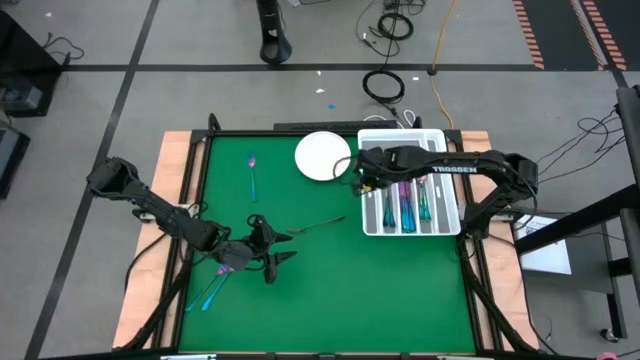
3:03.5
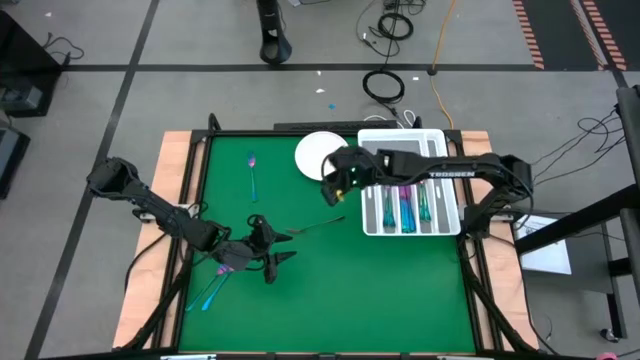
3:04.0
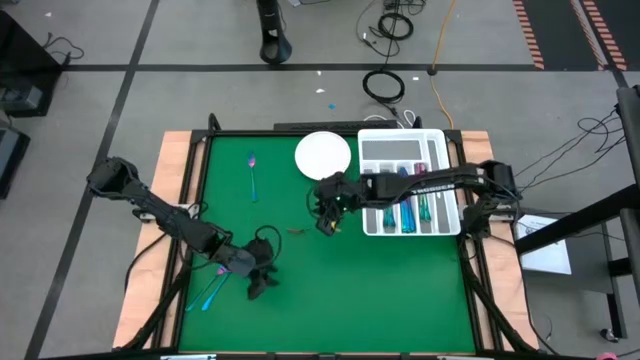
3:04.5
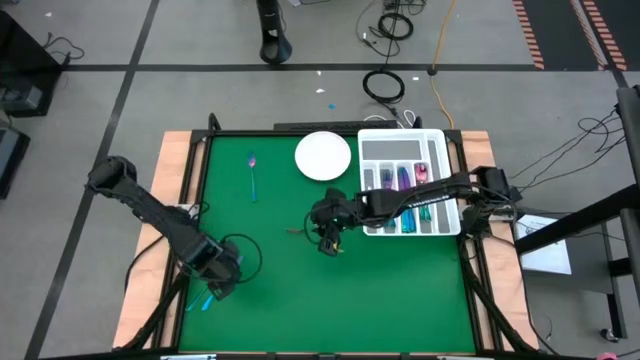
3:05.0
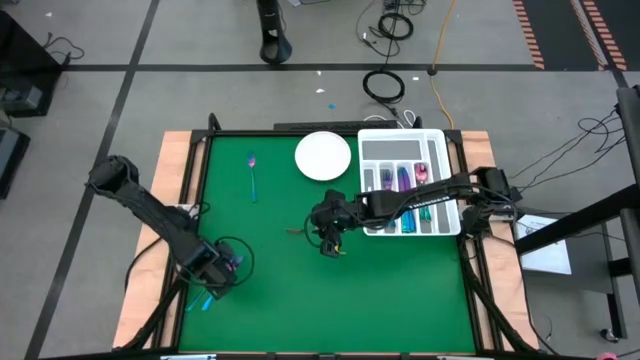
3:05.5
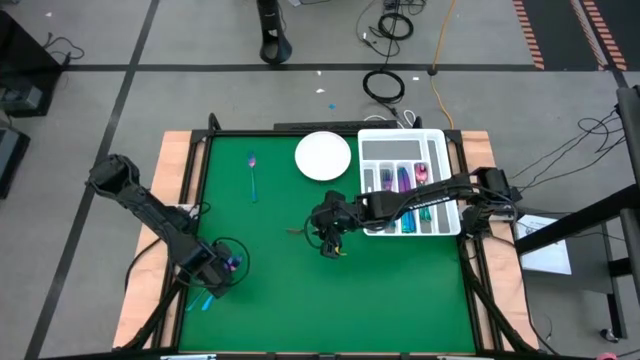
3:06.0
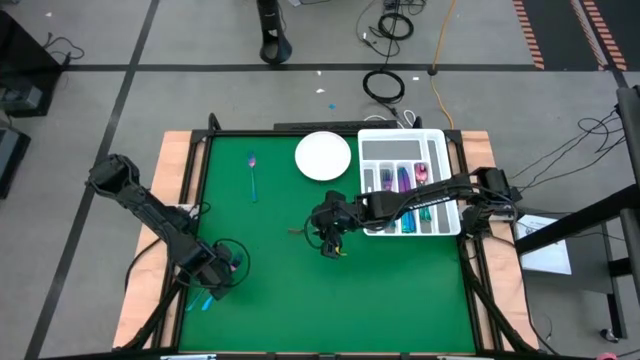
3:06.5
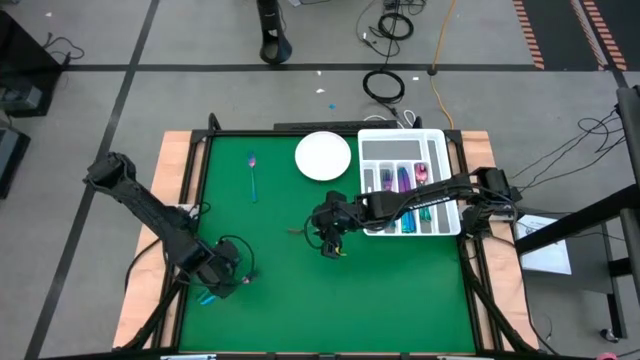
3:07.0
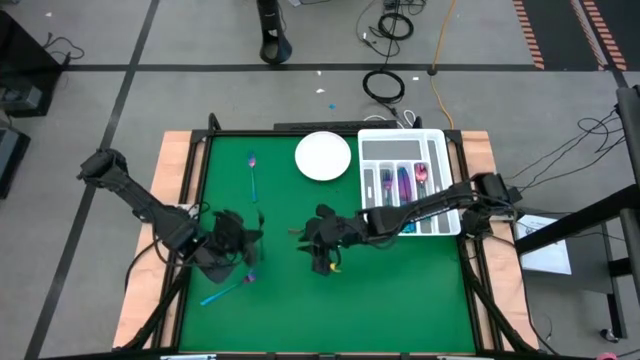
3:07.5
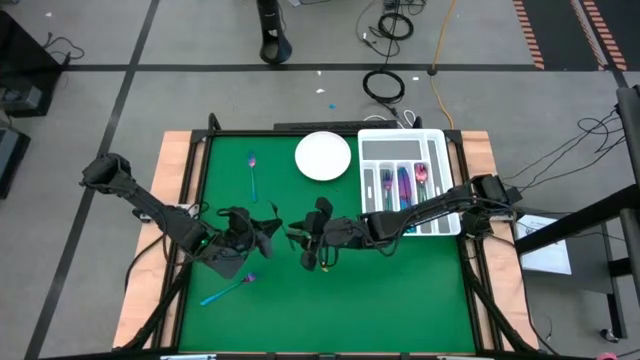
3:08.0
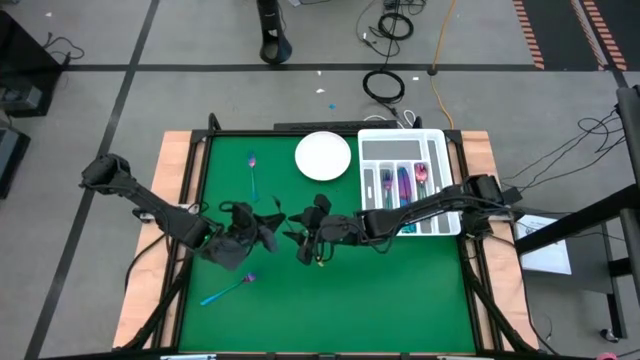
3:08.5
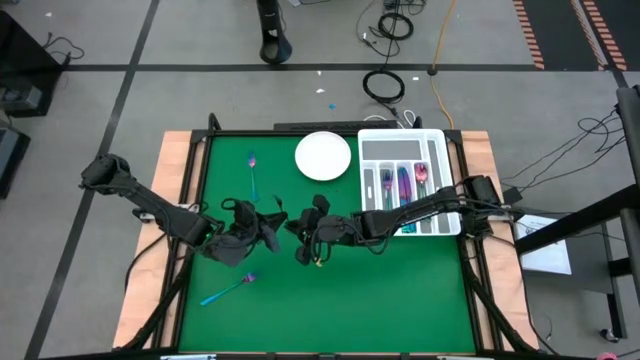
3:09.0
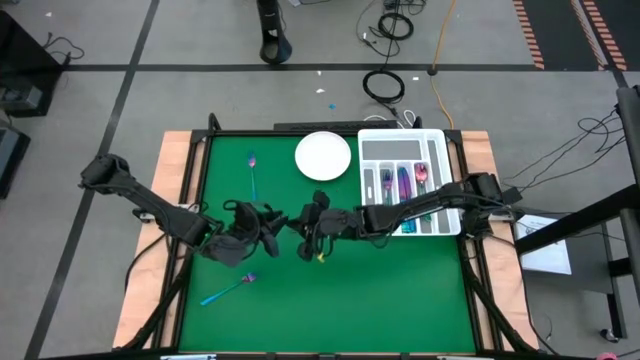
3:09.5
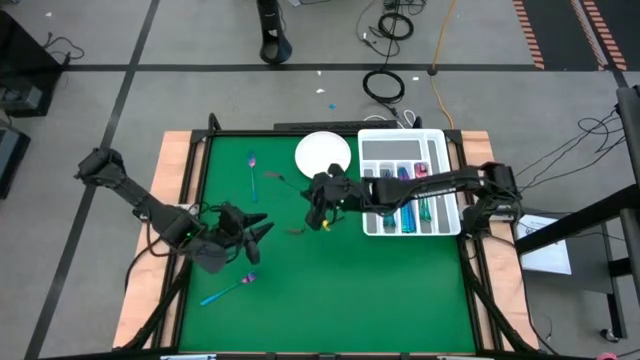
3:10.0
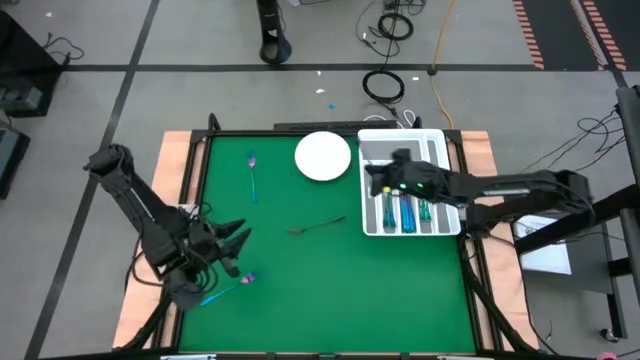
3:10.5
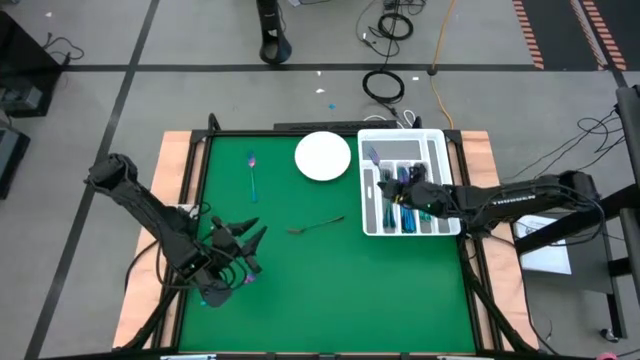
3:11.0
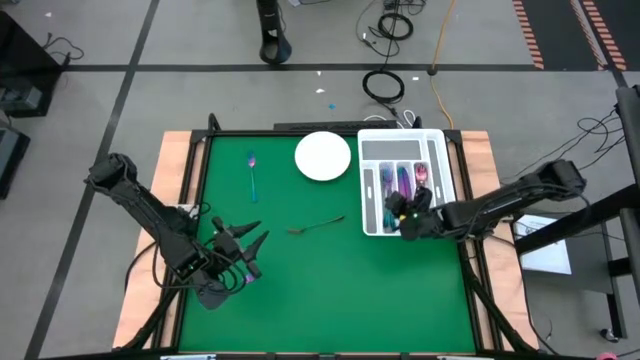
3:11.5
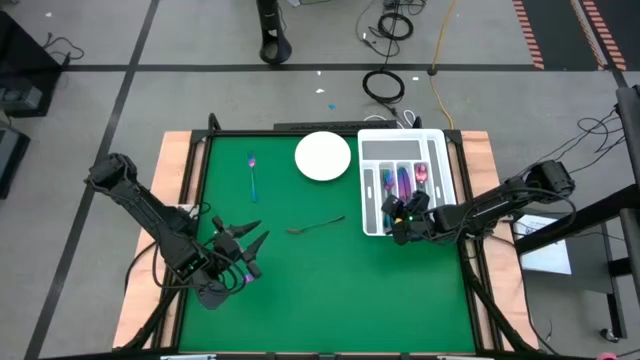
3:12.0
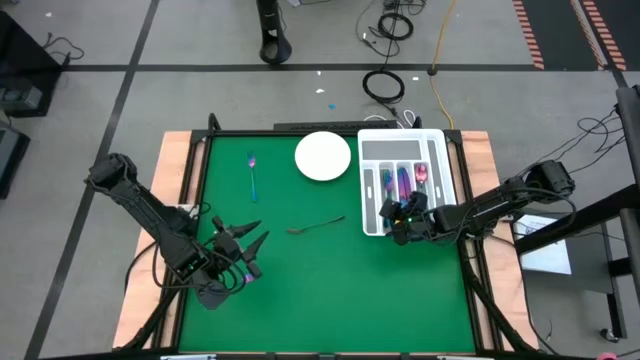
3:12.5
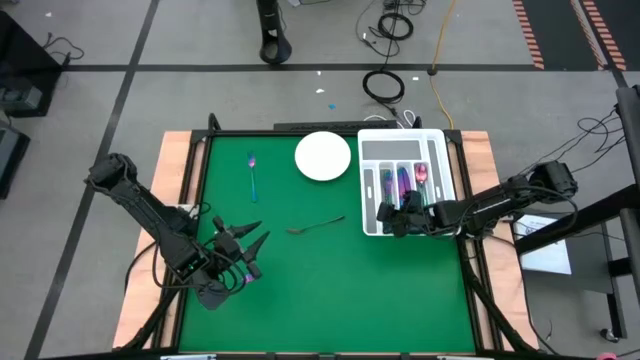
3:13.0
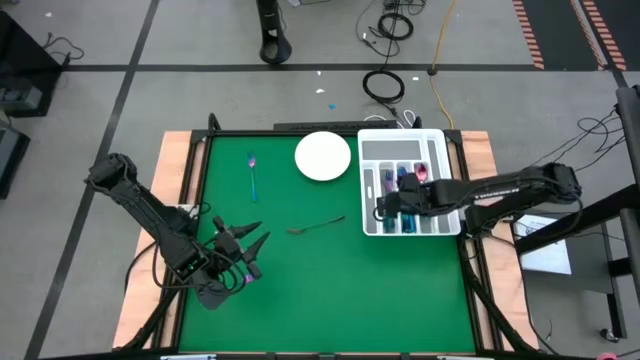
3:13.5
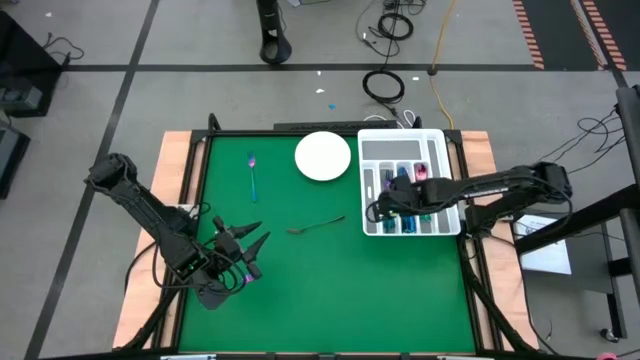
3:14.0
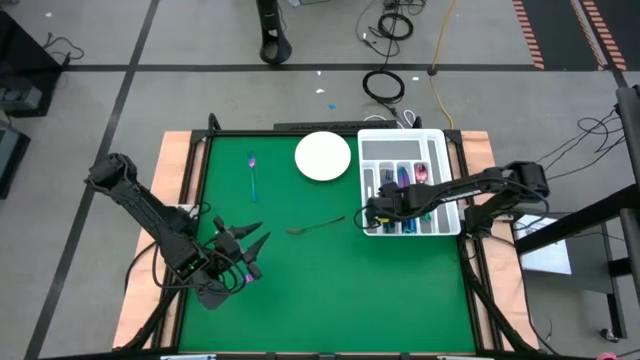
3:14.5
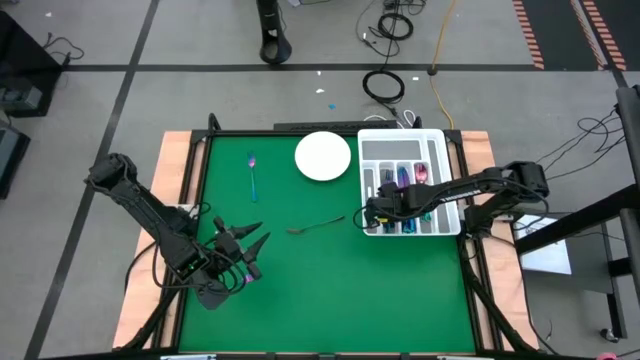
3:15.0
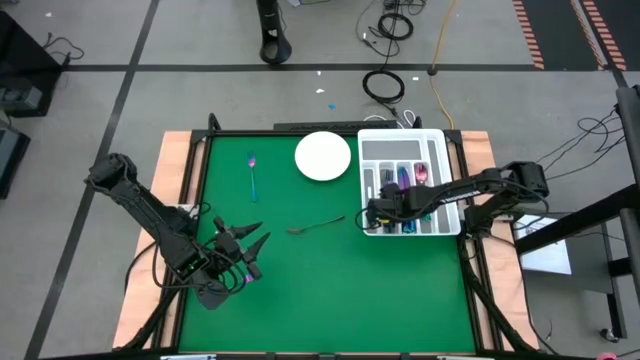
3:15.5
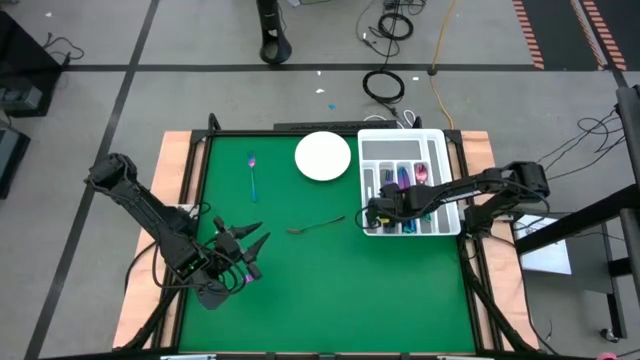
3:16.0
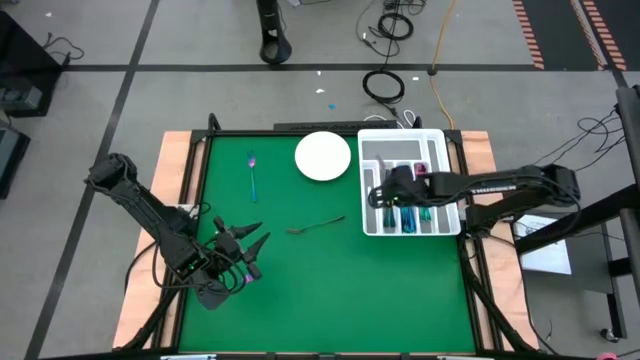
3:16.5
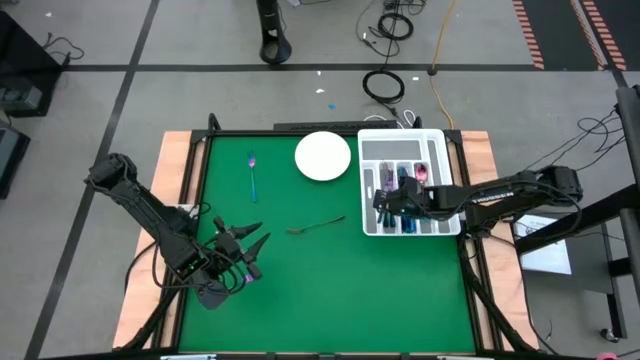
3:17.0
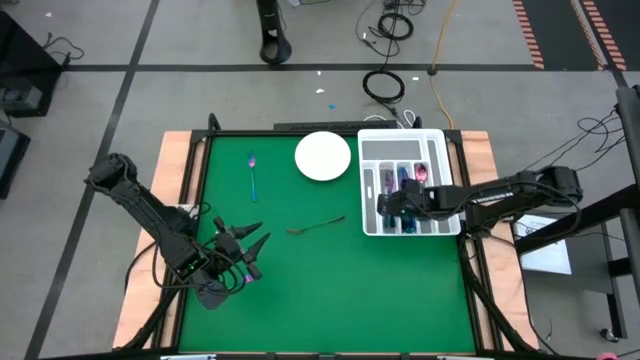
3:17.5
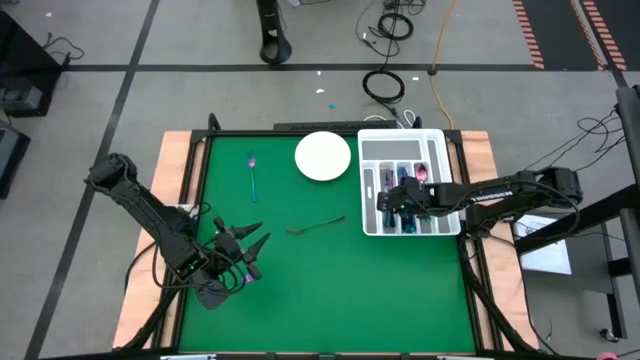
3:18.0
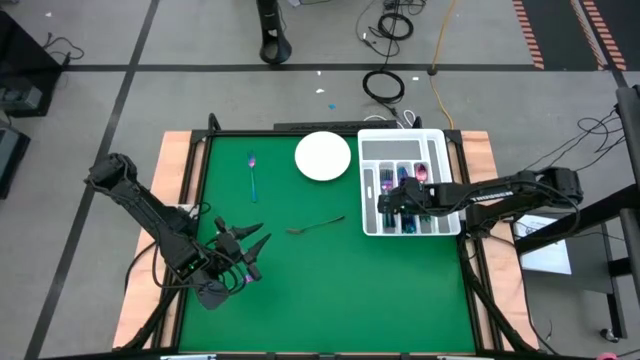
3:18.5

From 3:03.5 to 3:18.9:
Task: Sort silverware
Put the iridescent fork into the white silverware tray

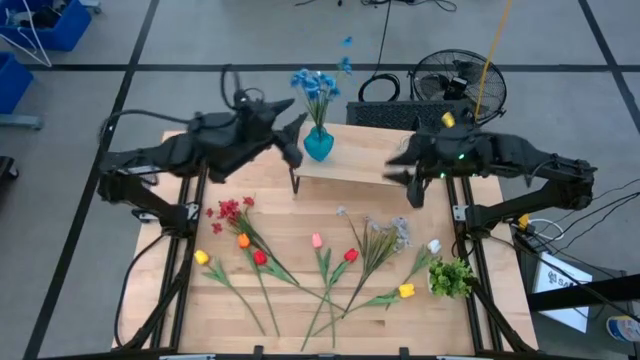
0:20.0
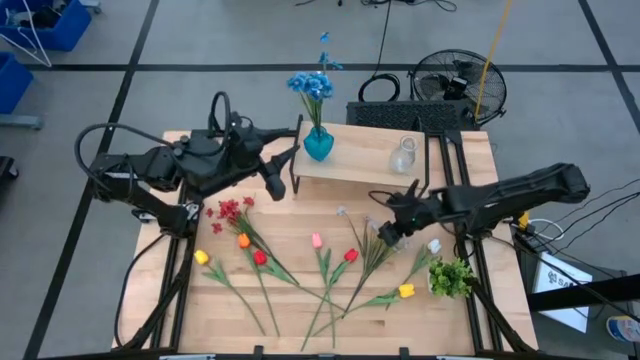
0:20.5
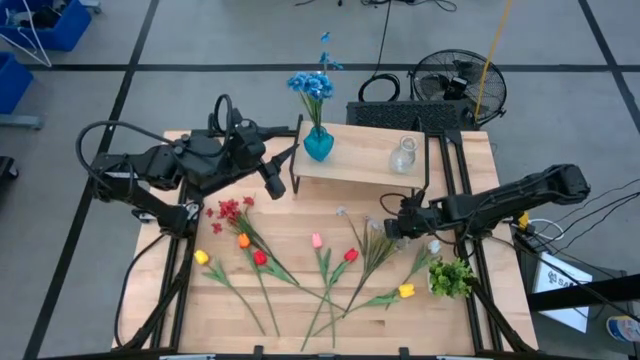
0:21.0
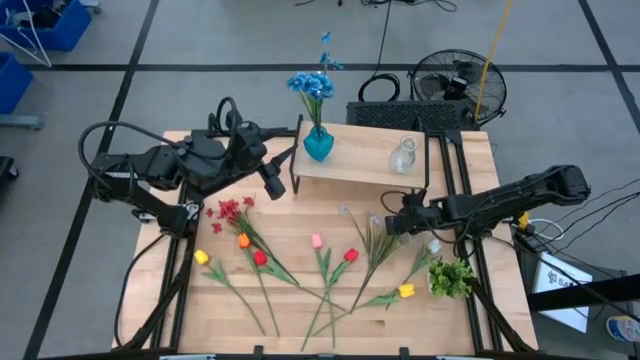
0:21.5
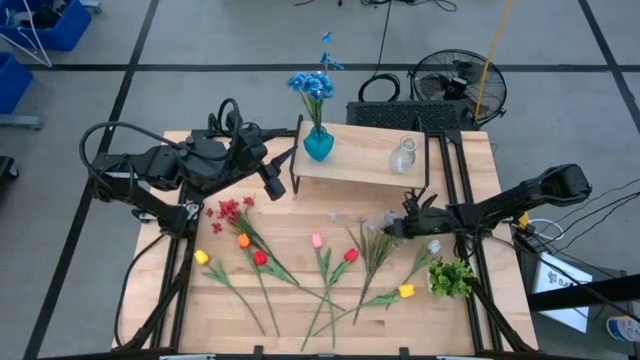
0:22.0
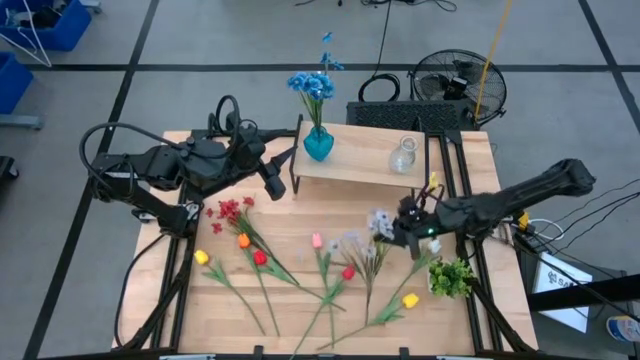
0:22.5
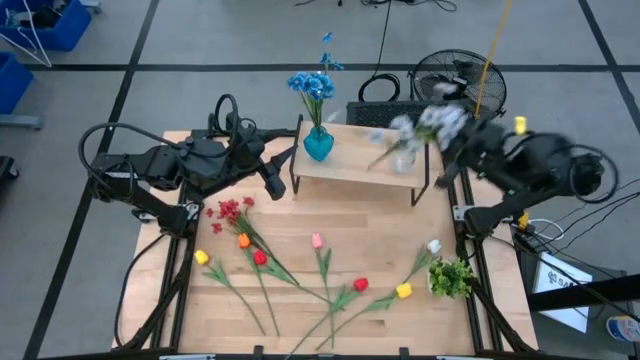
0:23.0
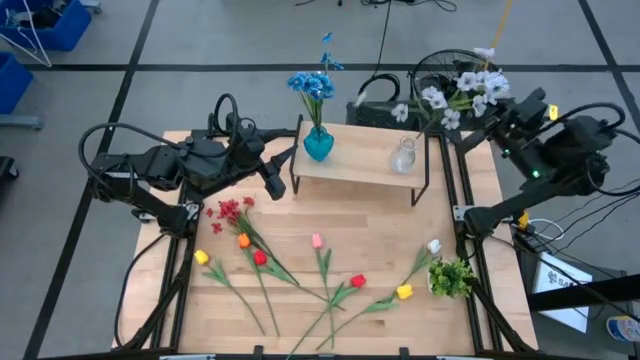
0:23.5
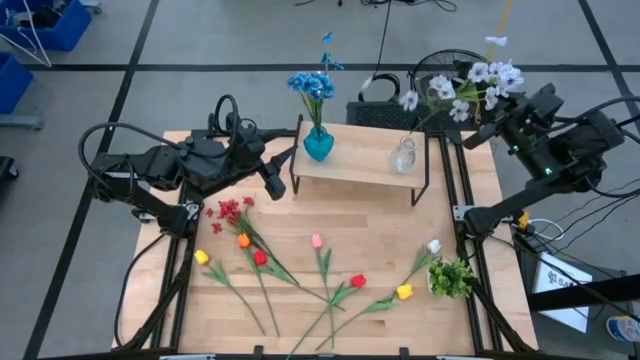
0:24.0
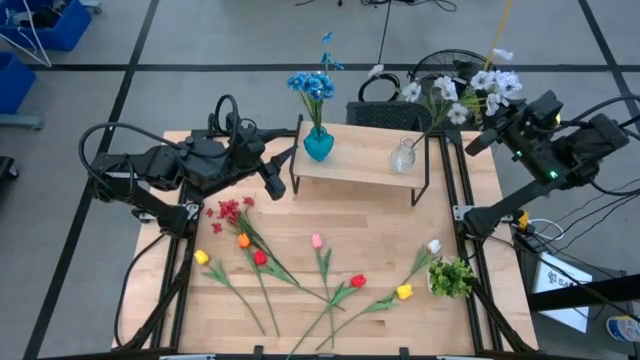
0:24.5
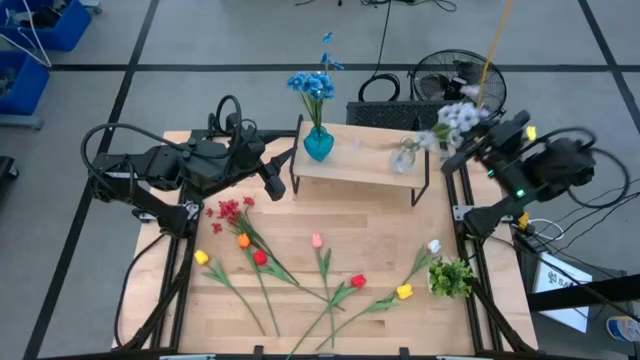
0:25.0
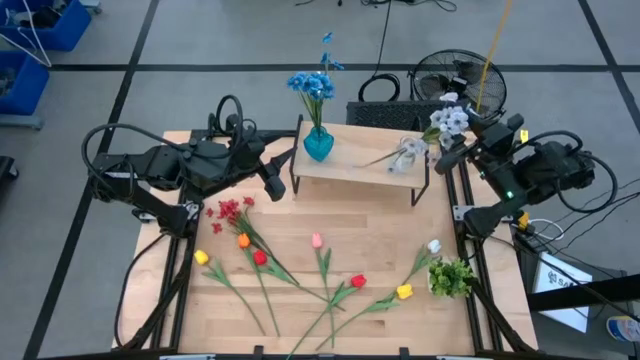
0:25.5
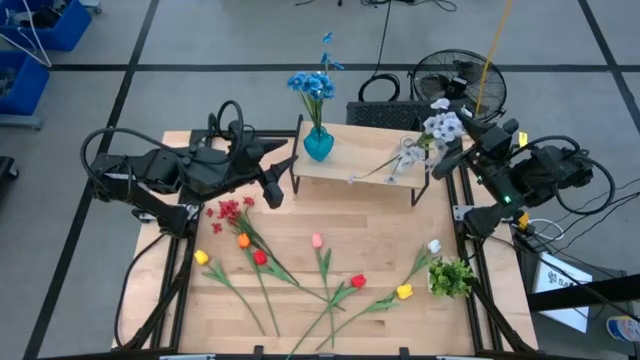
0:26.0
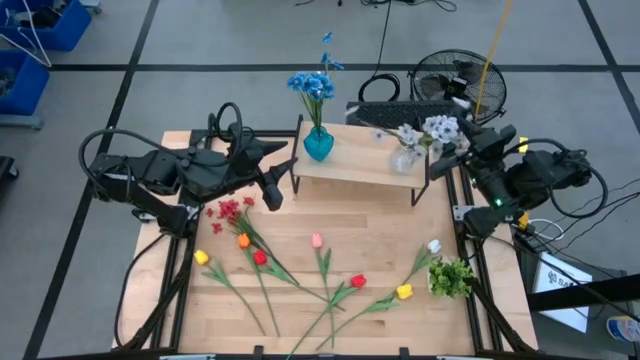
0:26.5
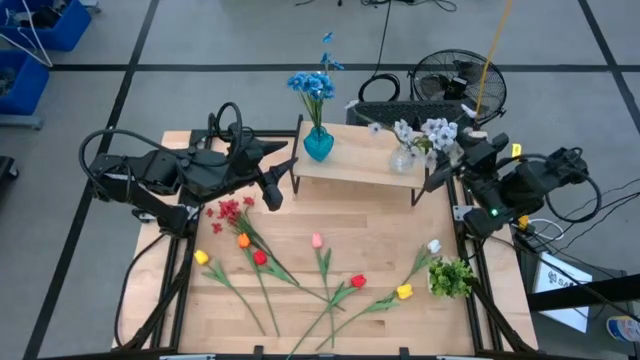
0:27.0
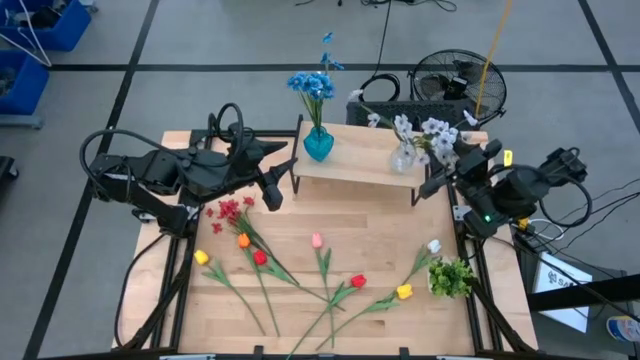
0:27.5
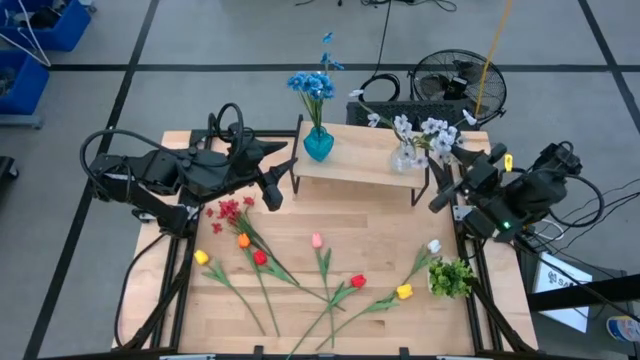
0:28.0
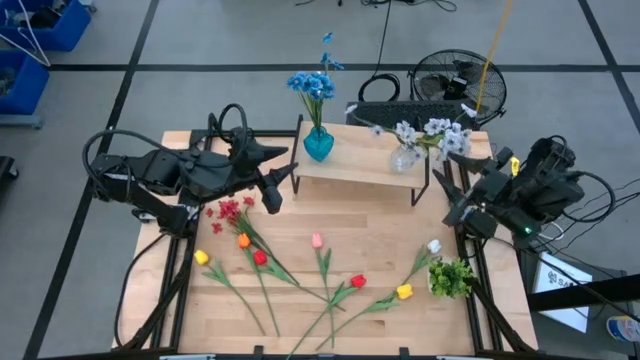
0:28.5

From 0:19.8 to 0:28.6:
Task: Pick and place flowers into a vace then onto a shelf
Put the white flowers into the transparent vase on the shelf
